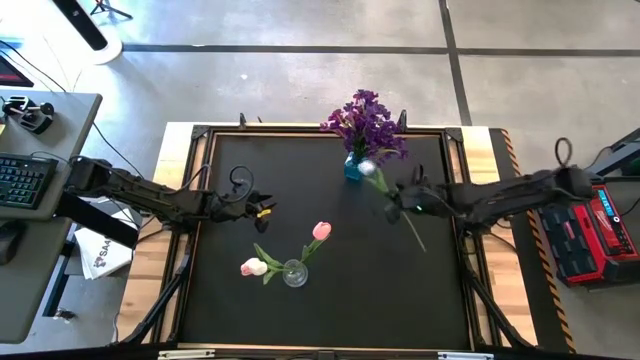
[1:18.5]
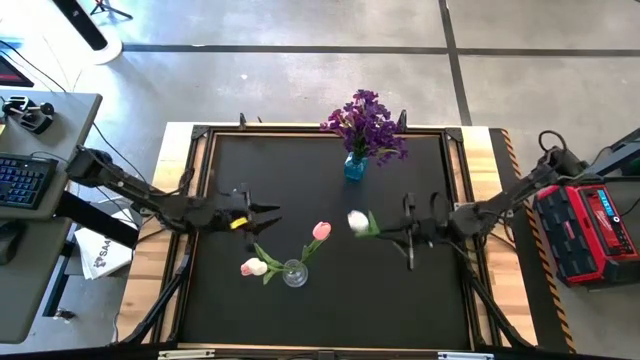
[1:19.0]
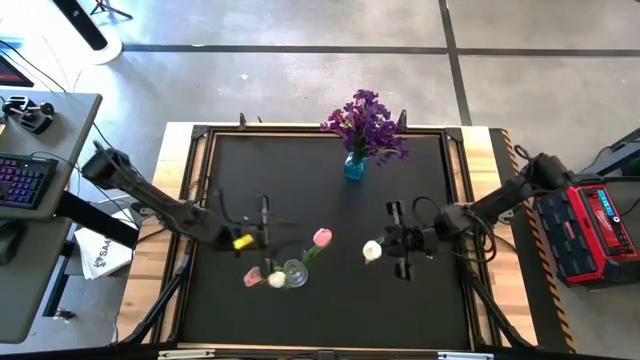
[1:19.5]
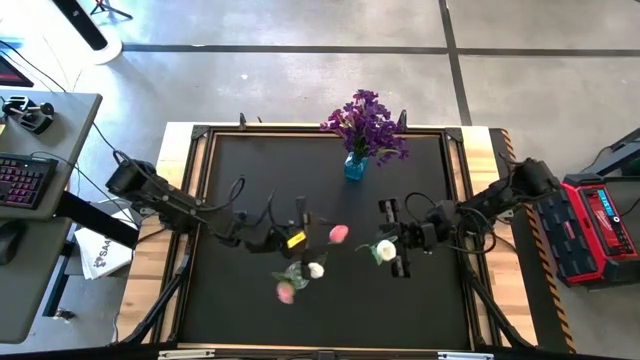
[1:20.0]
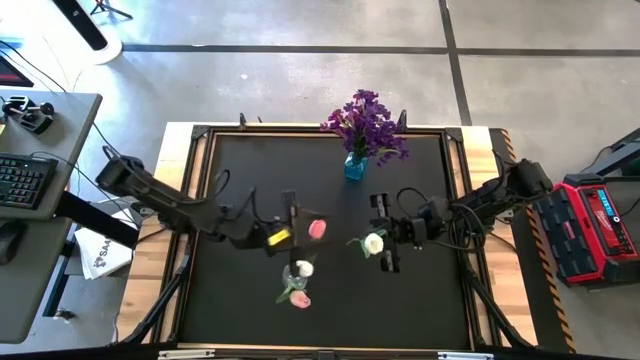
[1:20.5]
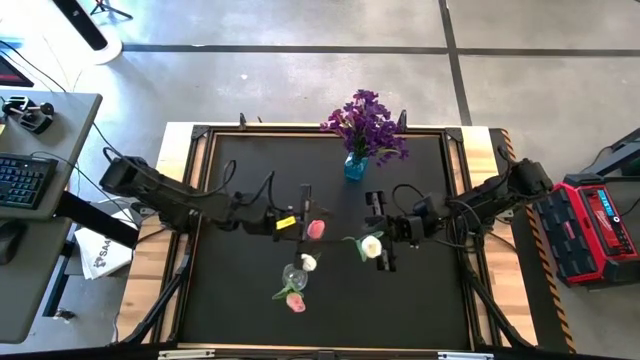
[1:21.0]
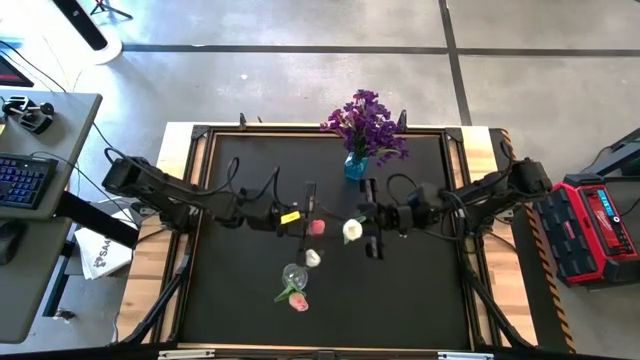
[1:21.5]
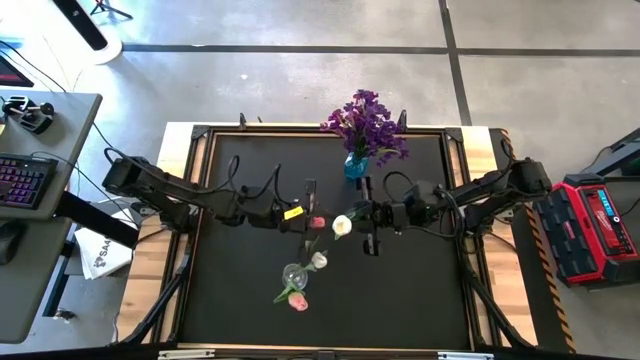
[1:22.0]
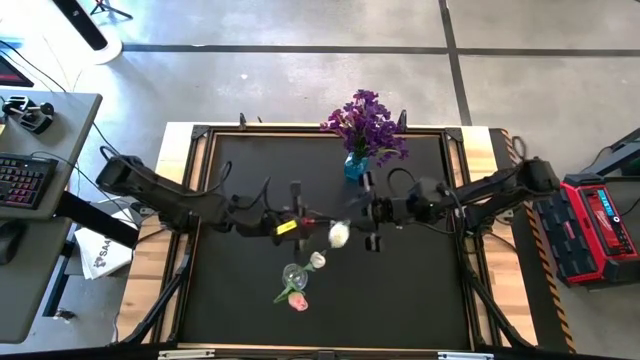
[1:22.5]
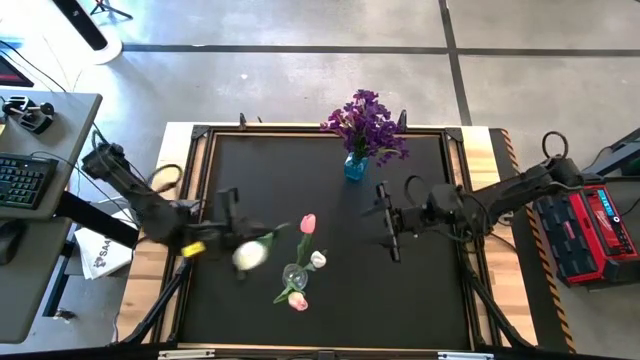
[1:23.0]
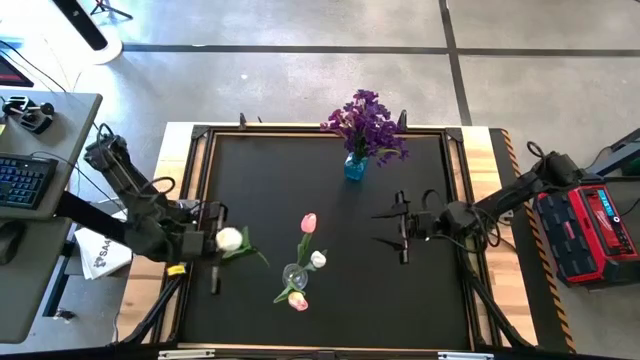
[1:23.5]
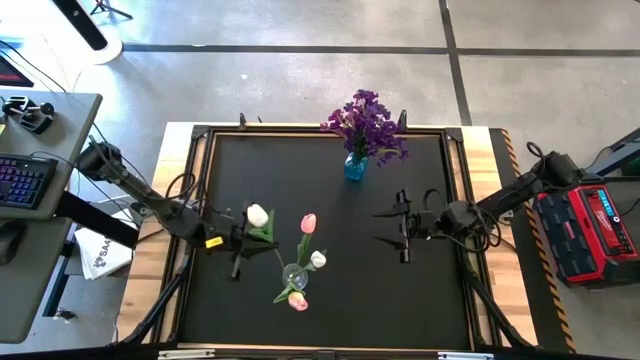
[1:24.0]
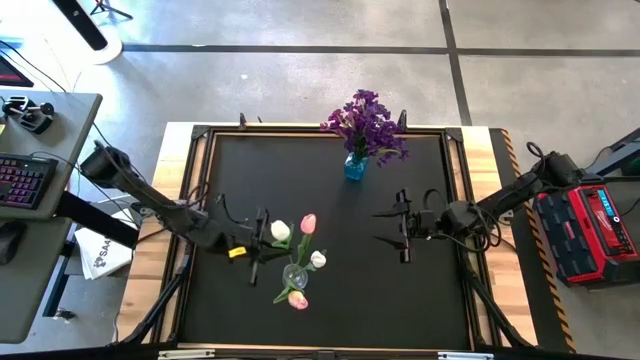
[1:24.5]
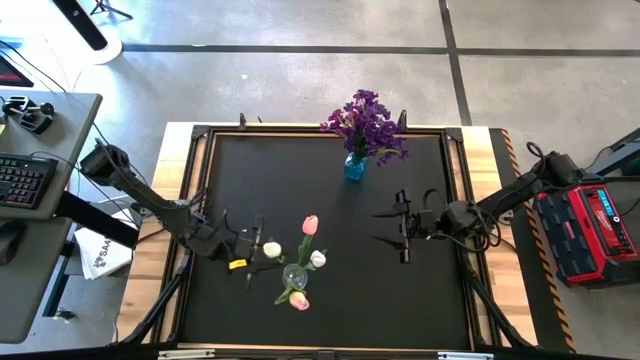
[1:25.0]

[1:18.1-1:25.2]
Task: Sort flowers into vase by color
Put the white flower into the transparent vase

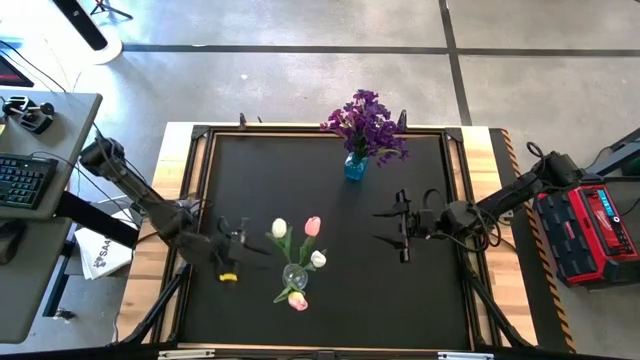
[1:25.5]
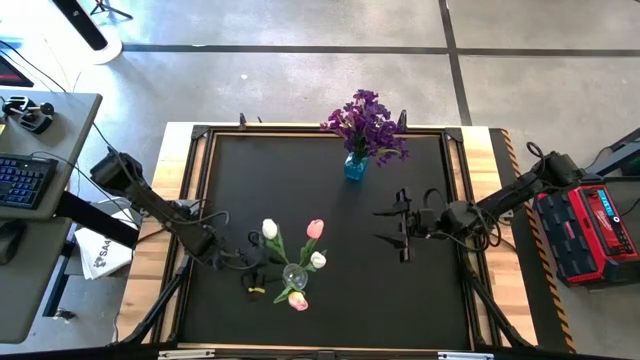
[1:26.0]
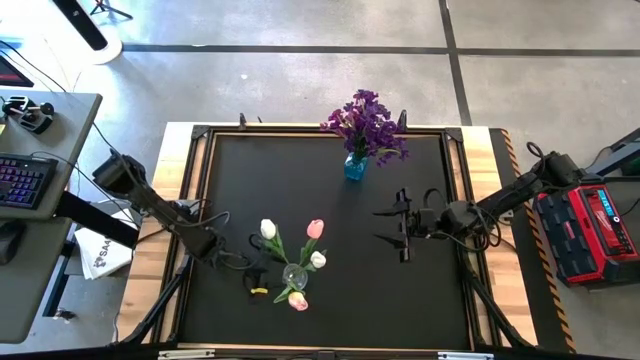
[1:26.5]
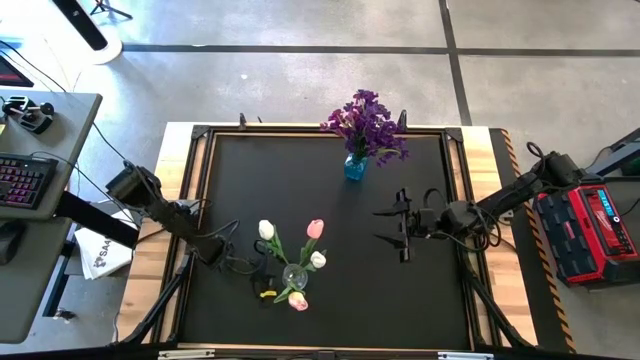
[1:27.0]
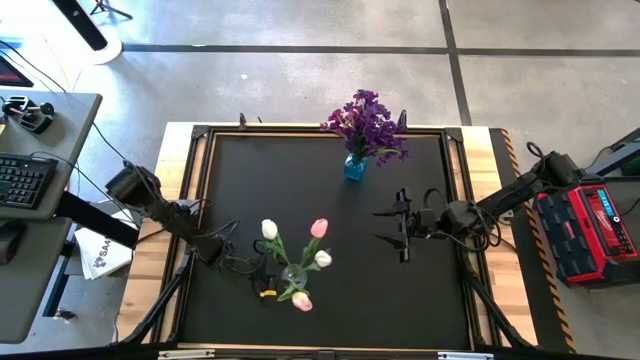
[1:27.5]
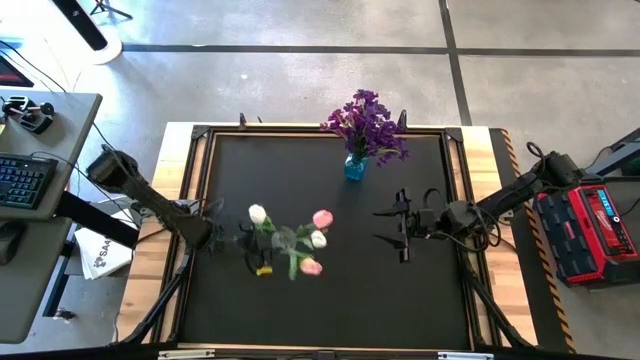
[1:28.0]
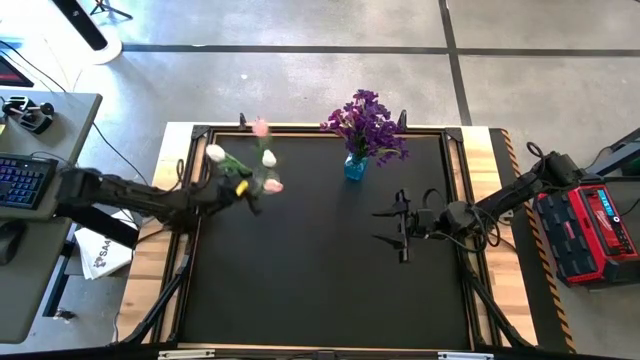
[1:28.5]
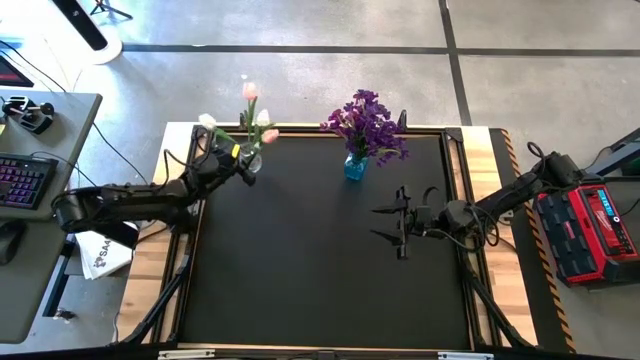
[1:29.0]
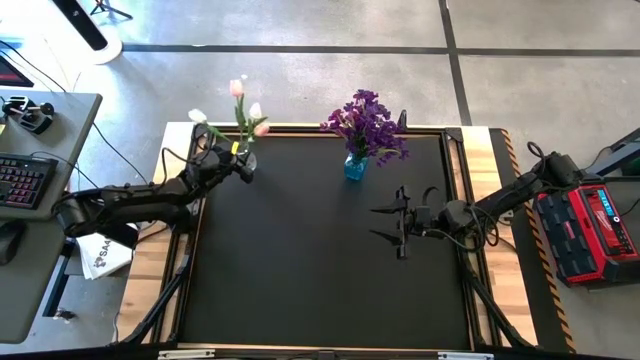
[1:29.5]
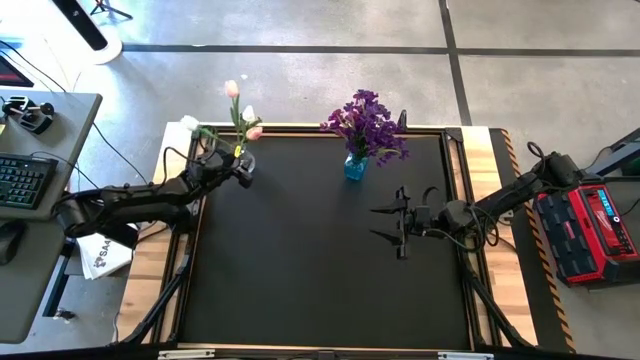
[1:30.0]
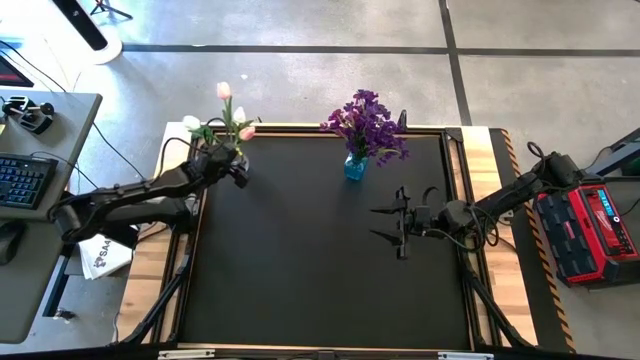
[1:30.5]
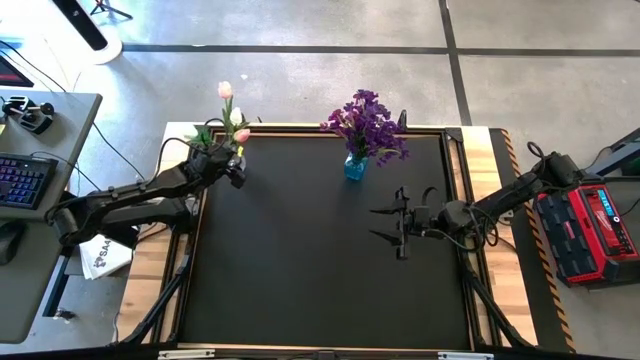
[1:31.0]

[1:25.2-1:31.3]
Move the transparent vase to the top left of the table

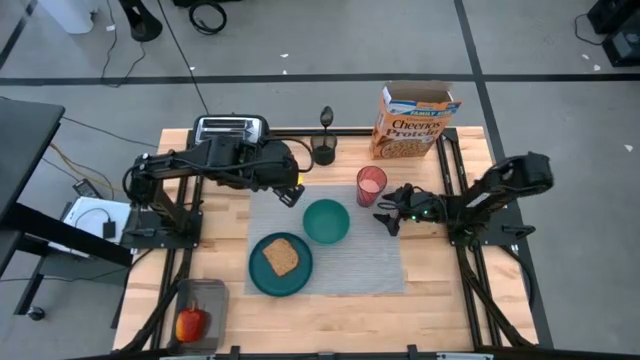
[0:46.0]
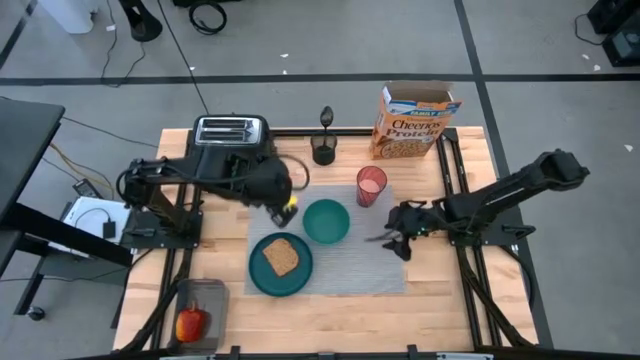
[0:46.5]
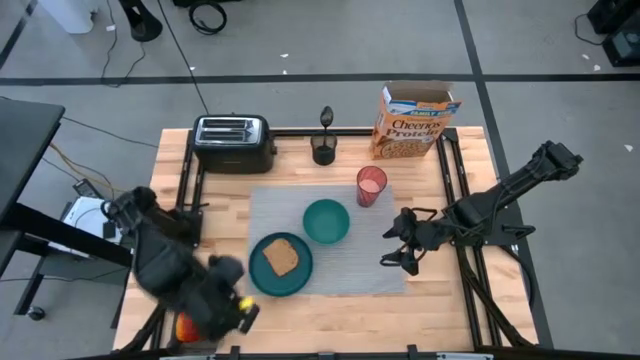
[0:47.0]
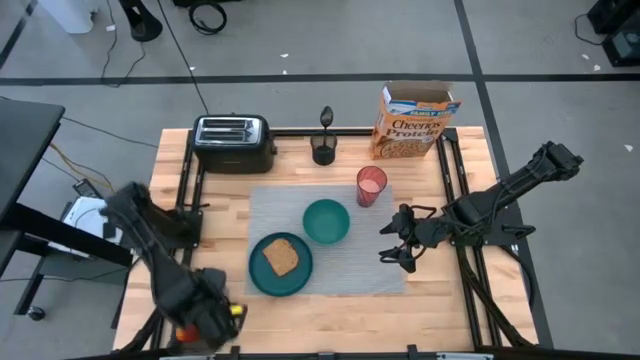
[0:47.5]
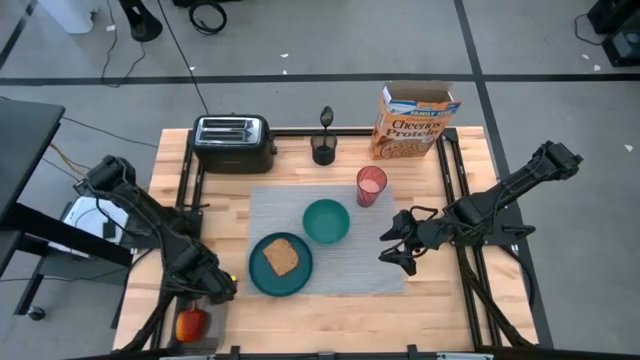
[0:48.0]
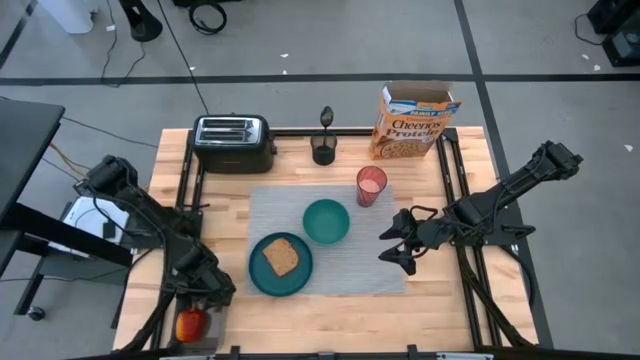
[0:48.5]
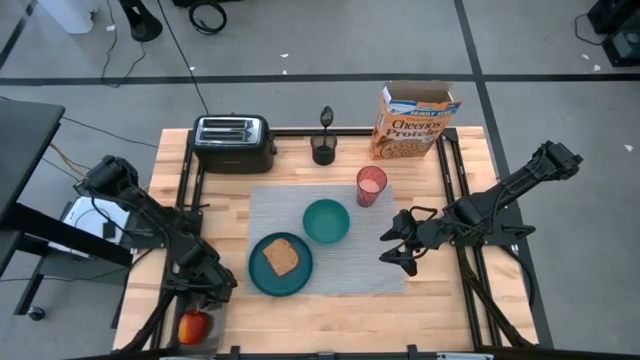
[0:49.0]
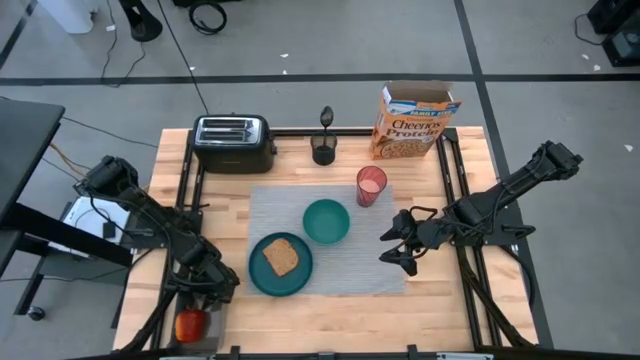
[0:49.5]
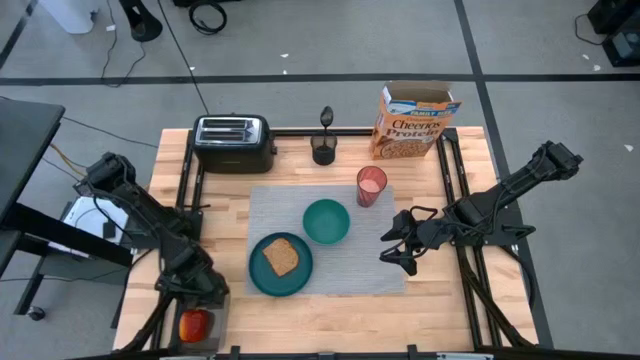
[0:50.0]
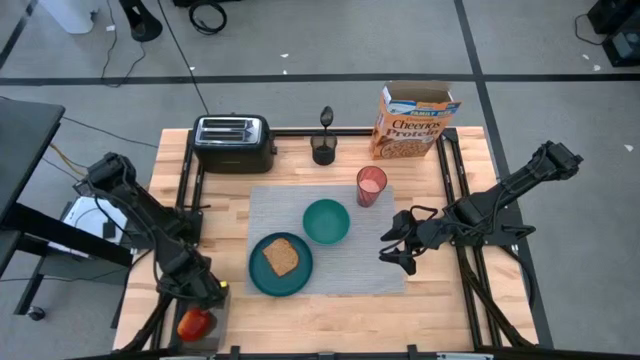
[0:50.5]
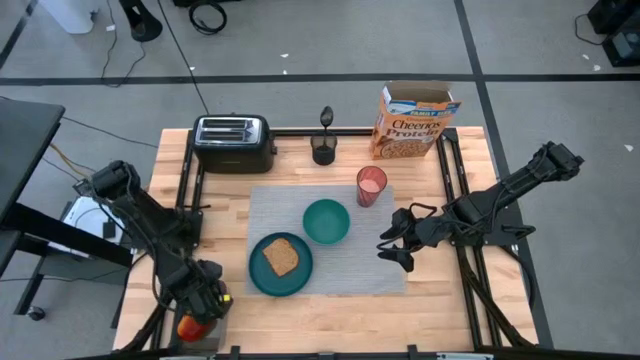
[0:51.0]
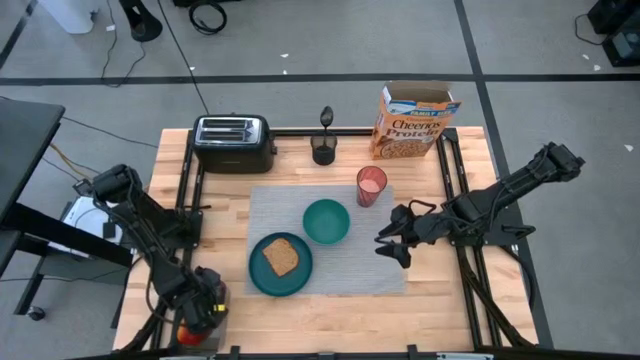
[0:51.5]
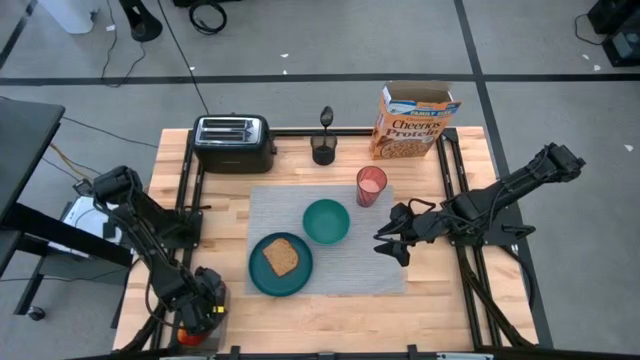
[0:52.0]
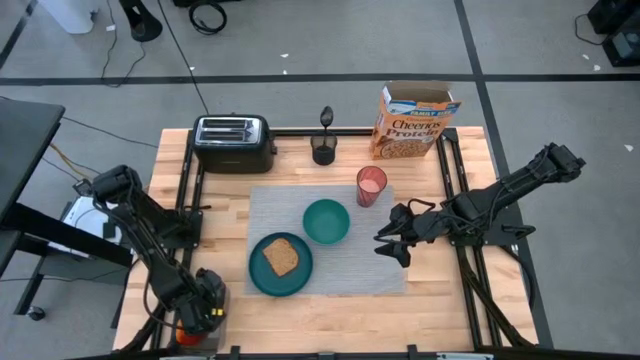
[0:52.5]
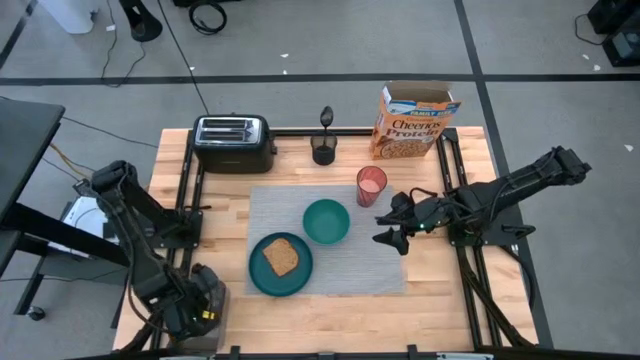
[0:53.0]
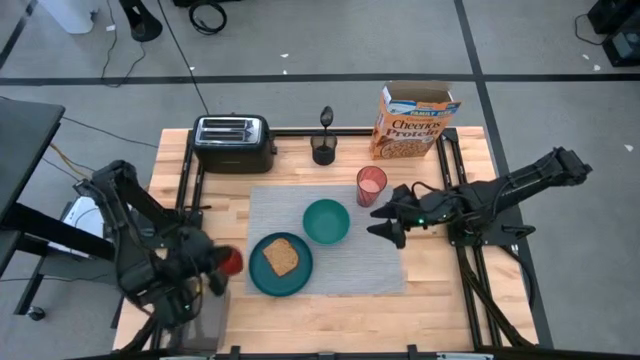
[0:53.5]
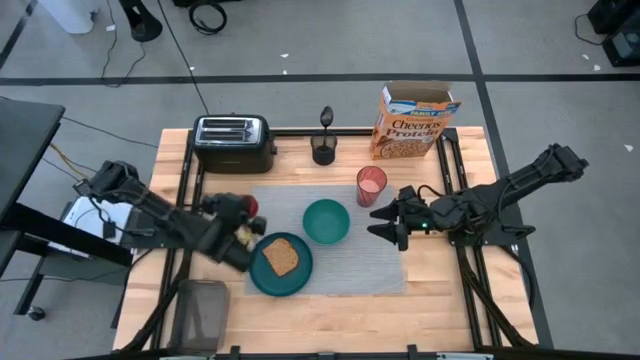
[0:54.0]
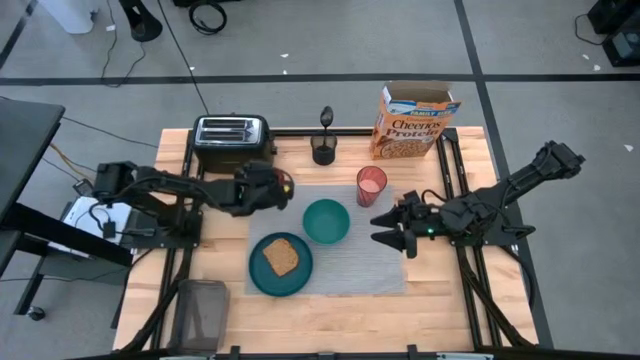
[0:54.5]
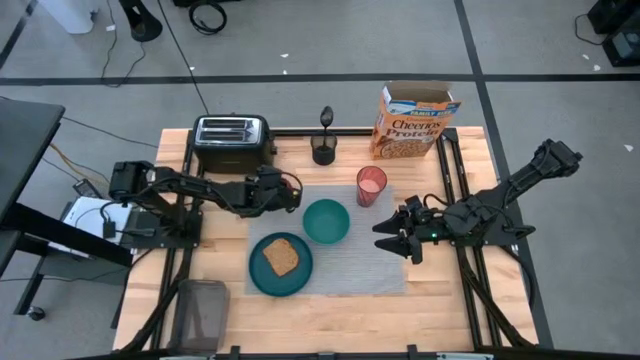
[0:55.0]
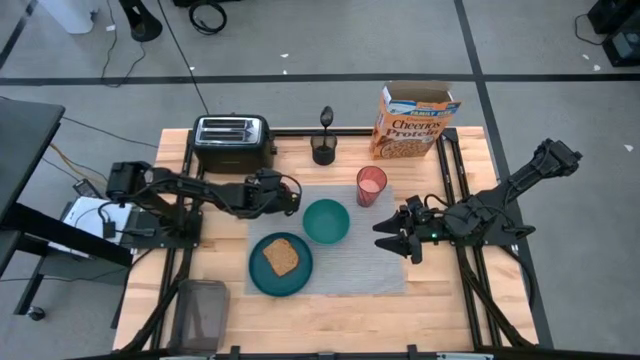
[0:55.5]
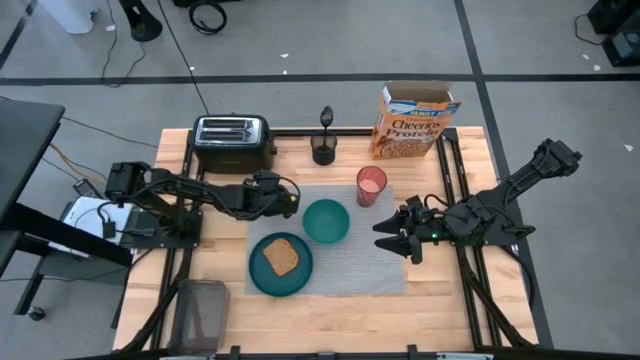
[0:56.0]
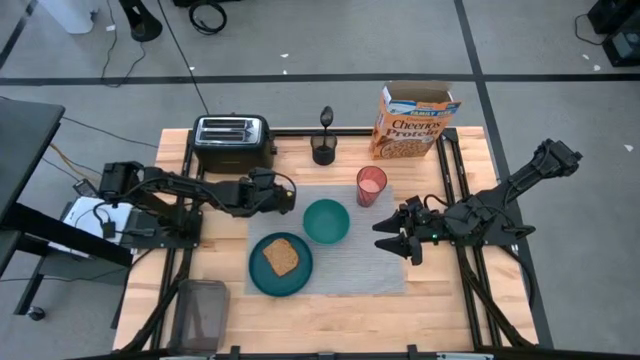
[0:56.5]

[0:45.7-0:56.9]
Task: Arrange a breakfast setting
Put the apple on the gray placemat to the top left of the dark green bowl
